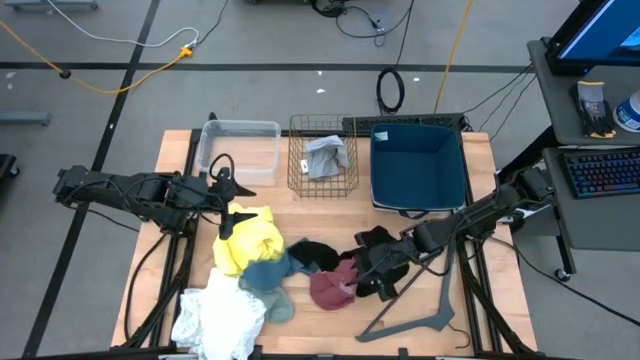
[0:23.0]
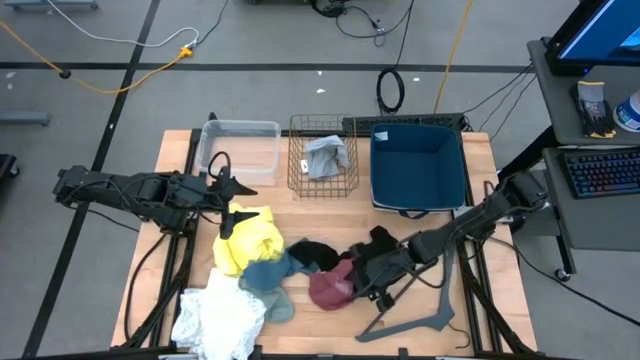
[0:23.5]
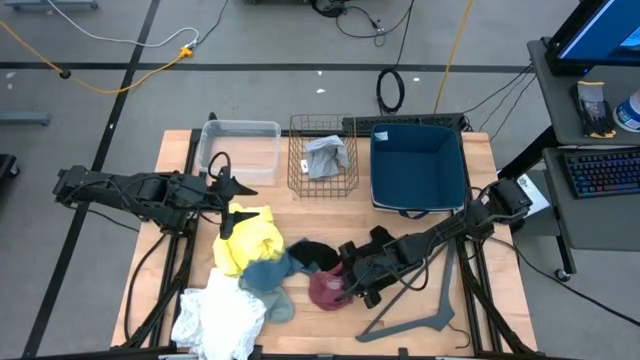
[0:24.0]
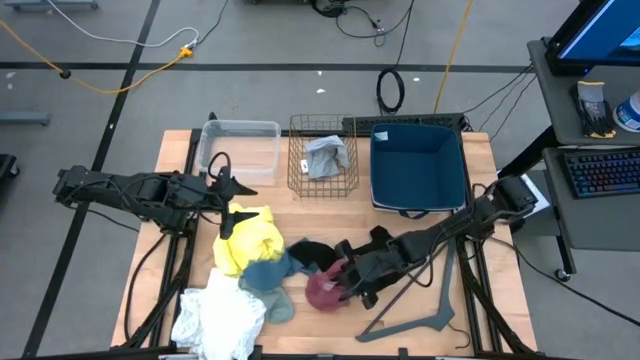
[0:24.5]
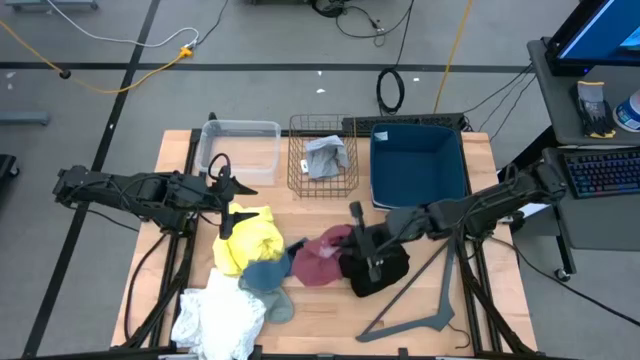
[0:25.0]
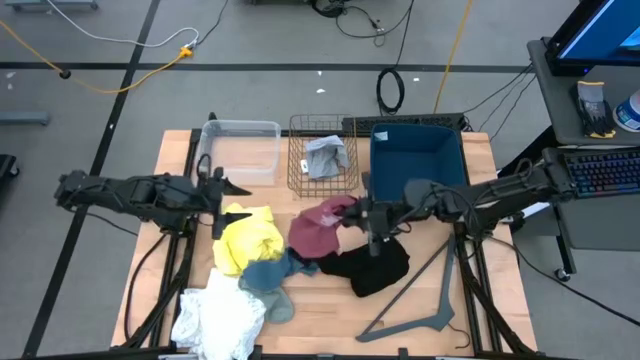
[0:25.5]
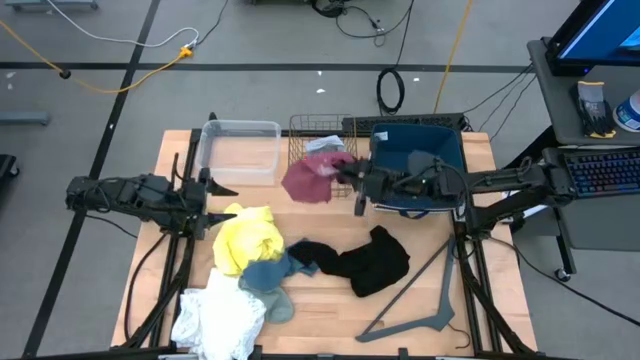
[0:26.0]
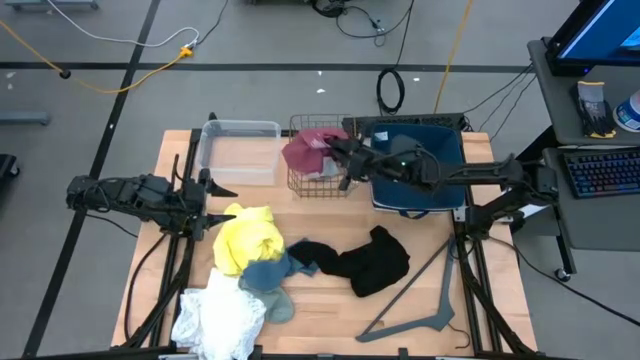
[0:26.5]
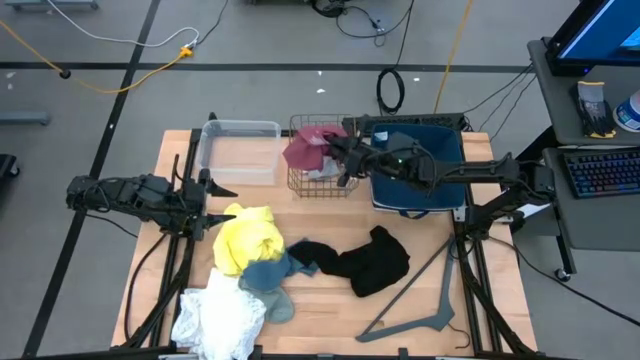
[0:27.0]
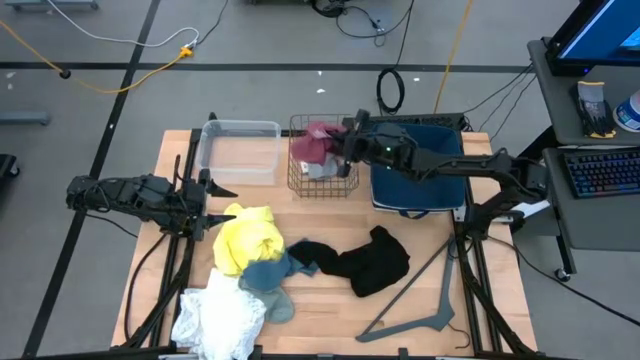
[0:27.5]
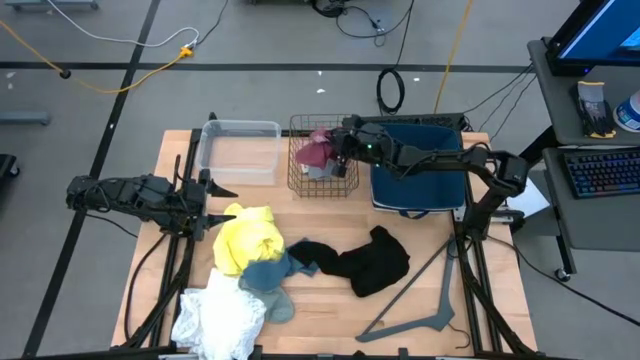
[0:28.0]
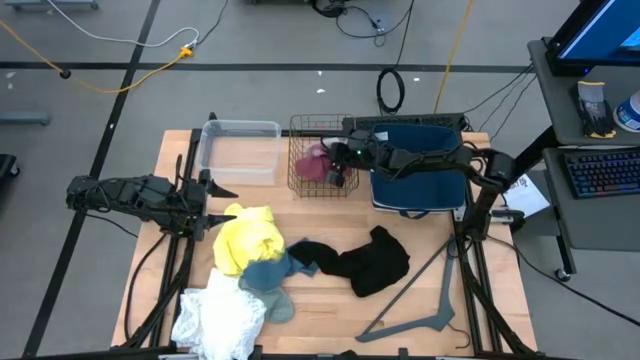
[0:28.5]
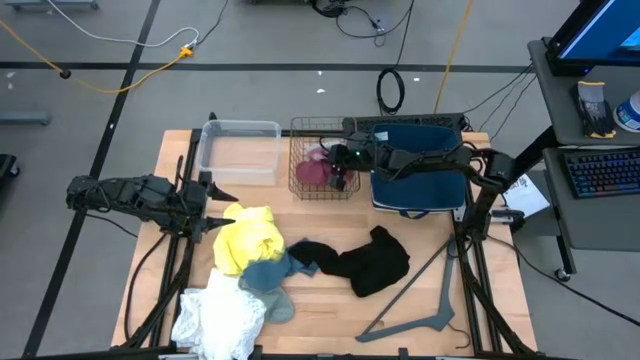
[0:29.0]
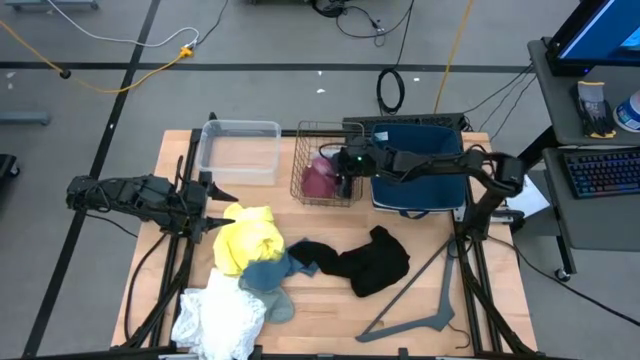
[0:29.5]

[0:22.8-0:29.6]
Task: Pick & Place Cloths
Put the red underwear into the wire basket

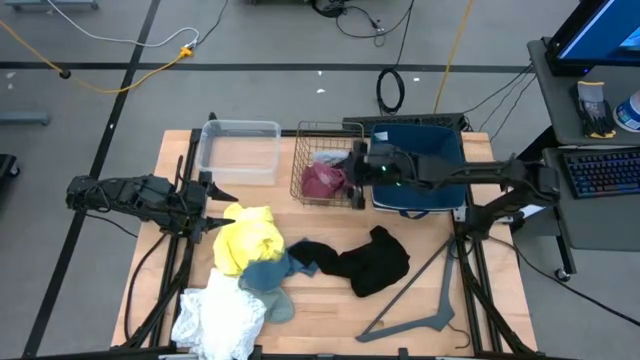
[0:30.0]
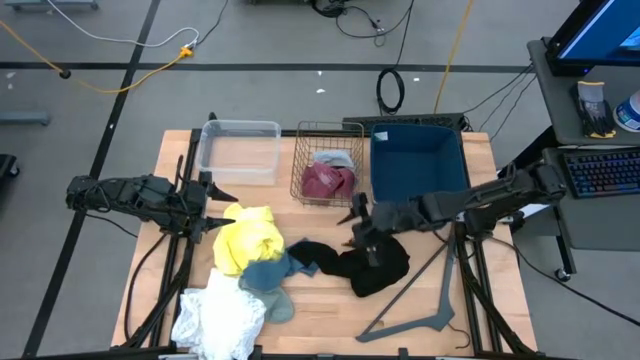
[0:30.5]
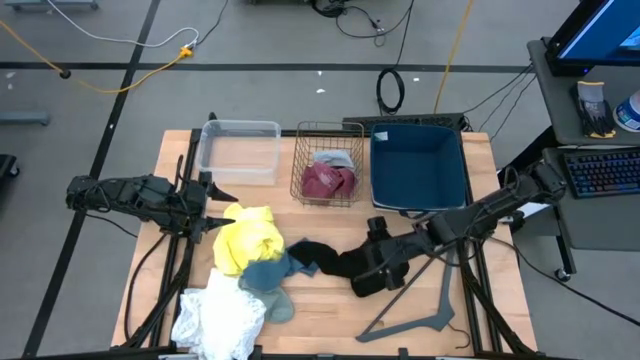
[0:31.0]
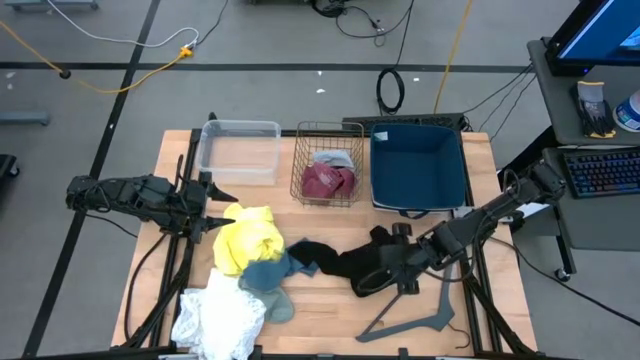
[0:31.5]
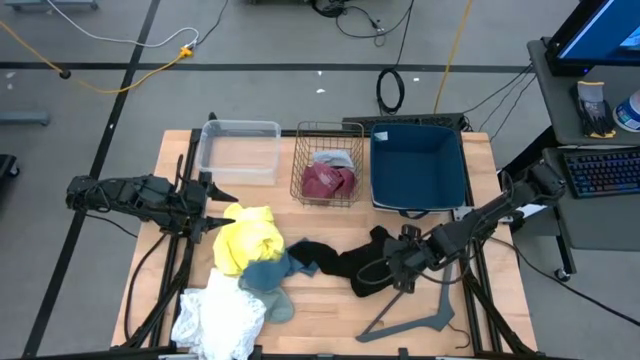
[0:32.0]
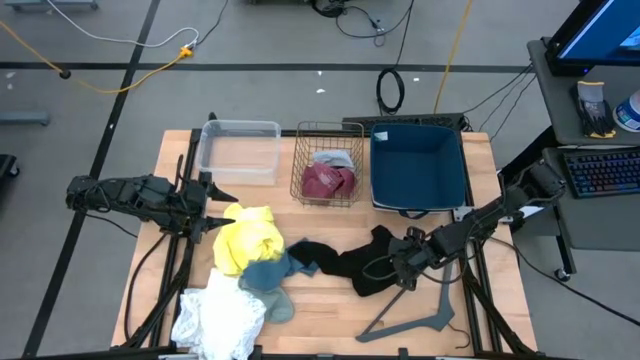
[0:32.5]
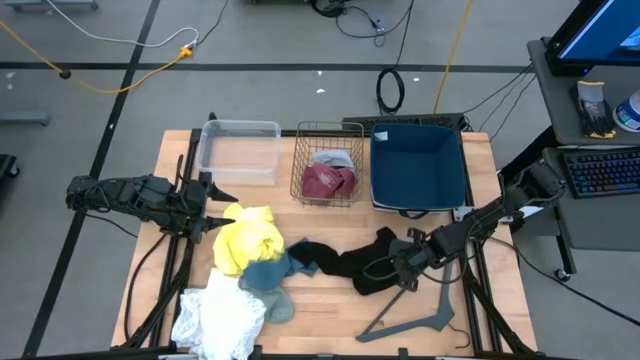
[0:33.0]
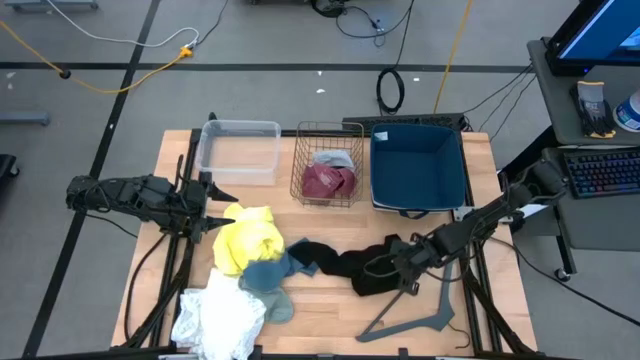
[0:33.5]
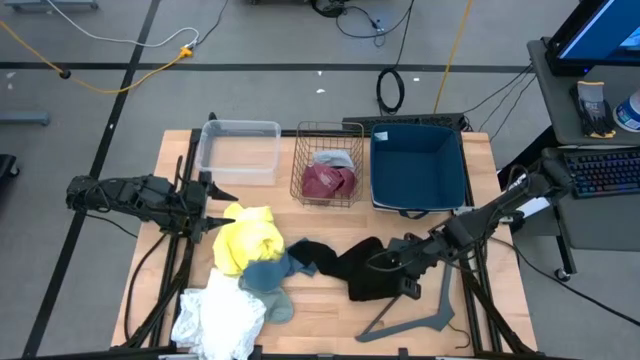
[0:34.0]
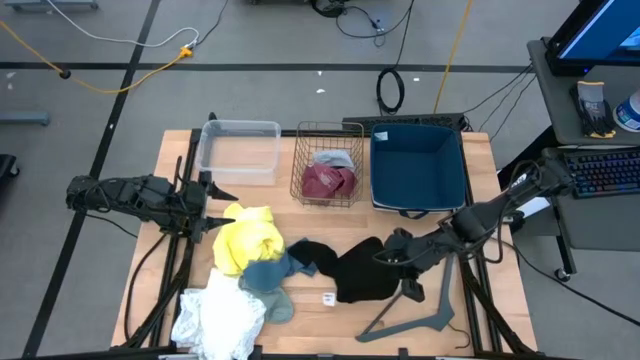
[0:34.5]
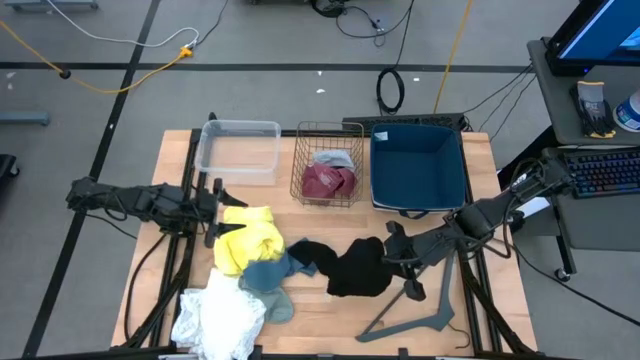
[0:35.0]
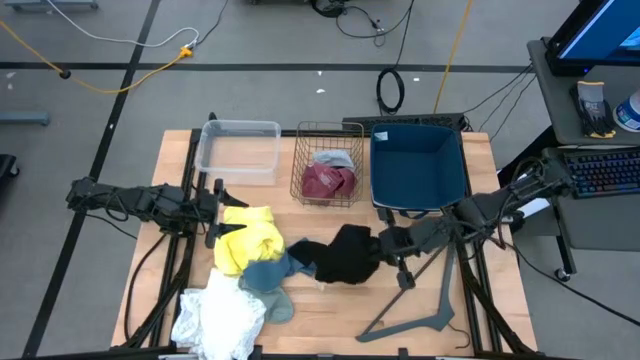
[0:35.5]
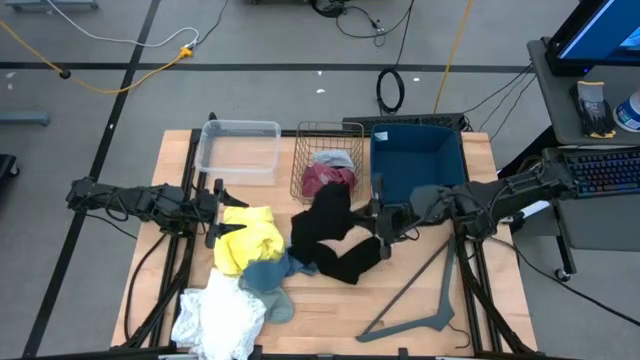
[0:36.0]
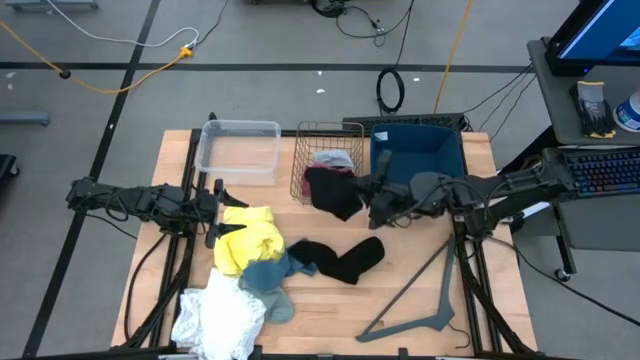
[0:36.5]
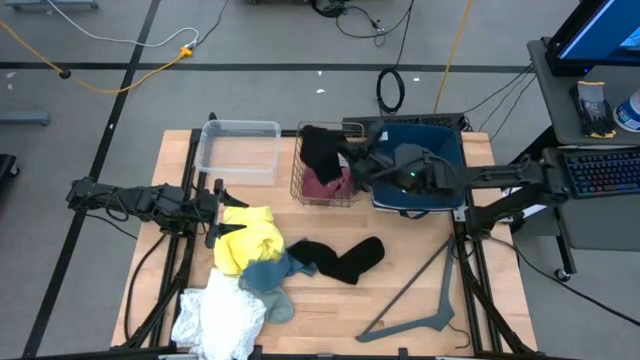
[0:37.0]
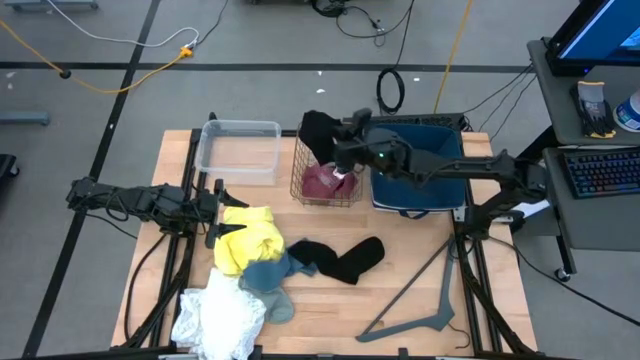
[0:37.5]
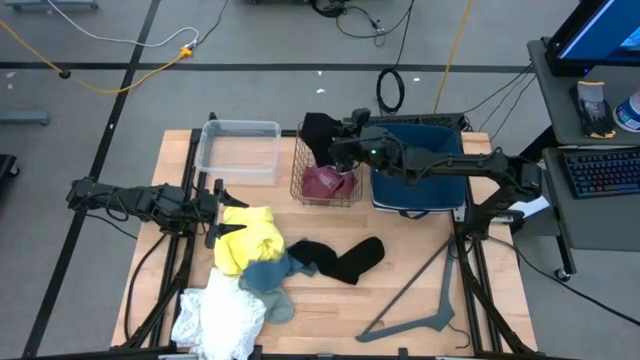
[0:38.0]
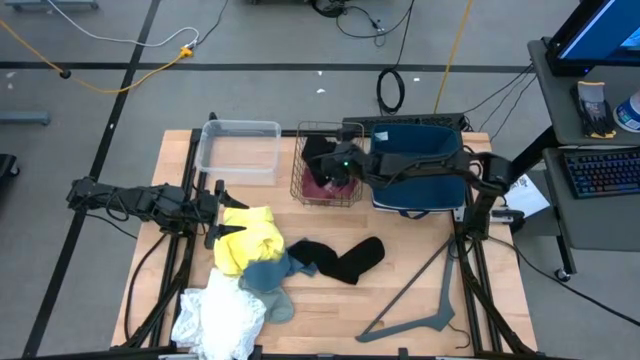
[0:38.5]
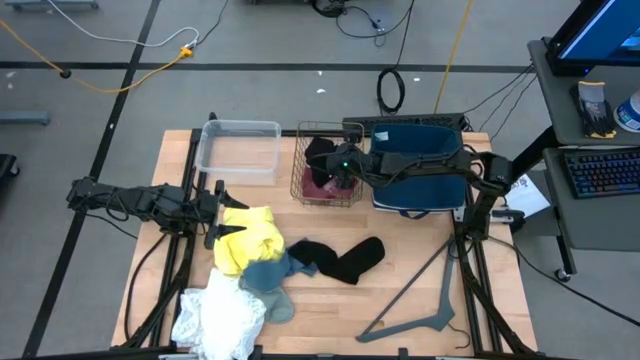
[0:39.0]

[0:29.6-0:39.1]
Put the black shorts into the wire basket

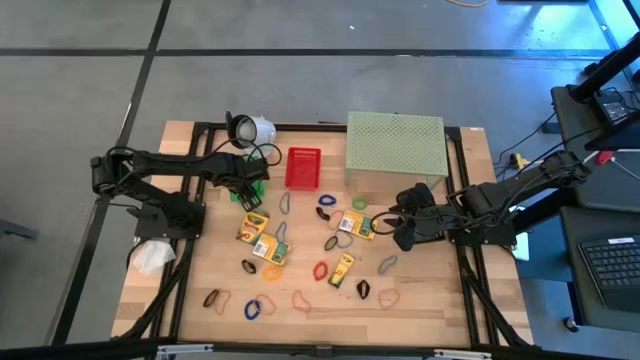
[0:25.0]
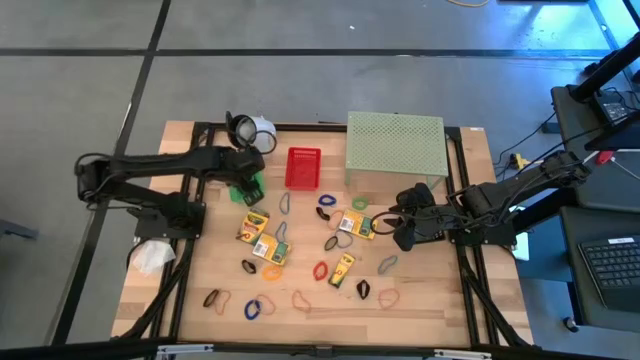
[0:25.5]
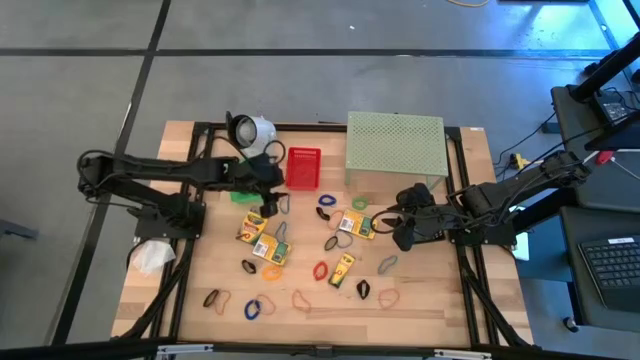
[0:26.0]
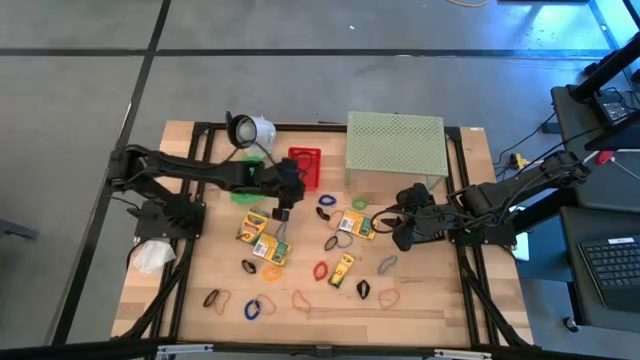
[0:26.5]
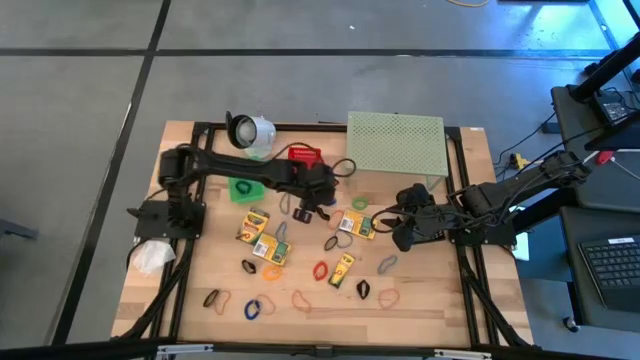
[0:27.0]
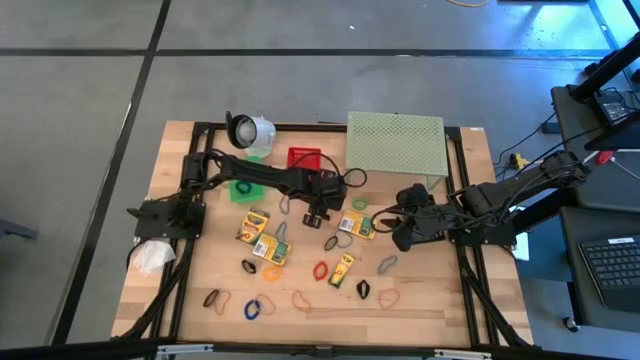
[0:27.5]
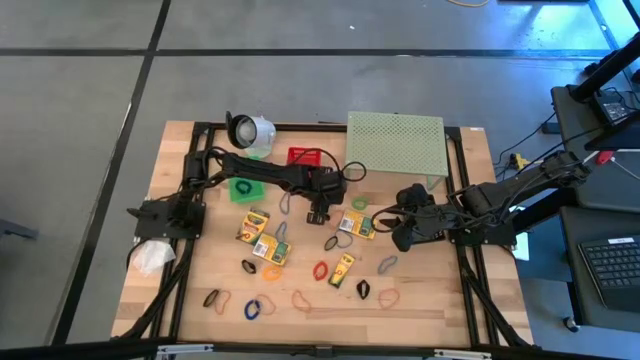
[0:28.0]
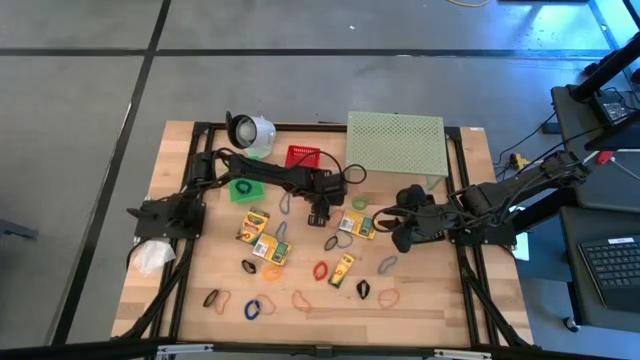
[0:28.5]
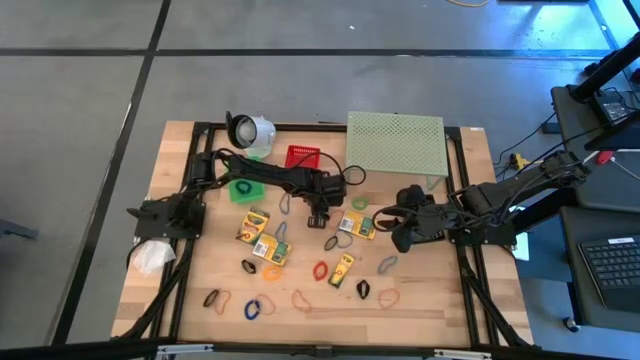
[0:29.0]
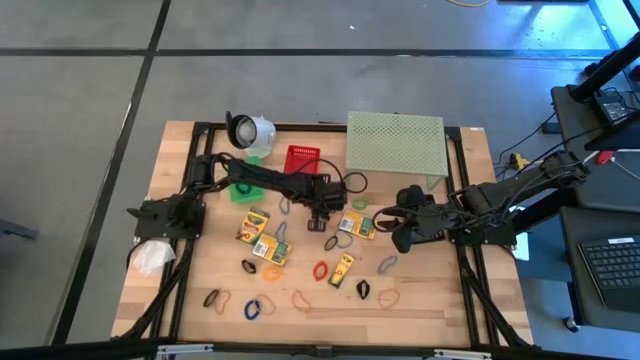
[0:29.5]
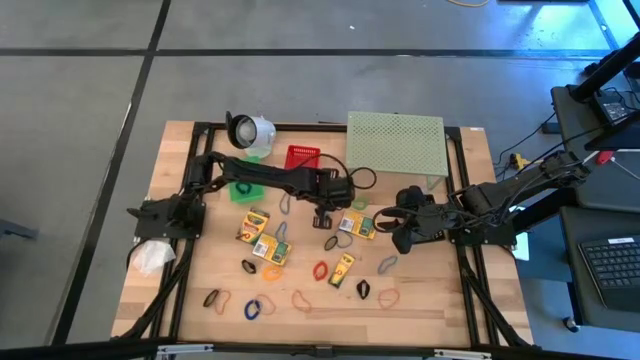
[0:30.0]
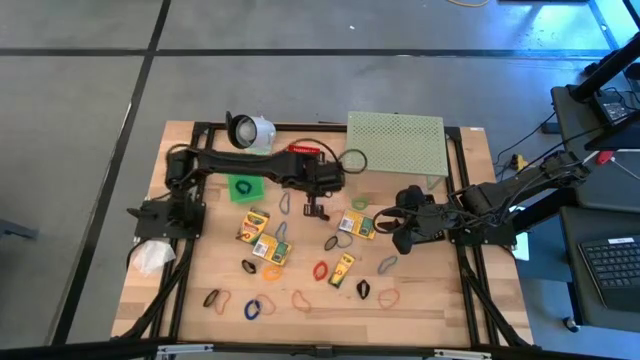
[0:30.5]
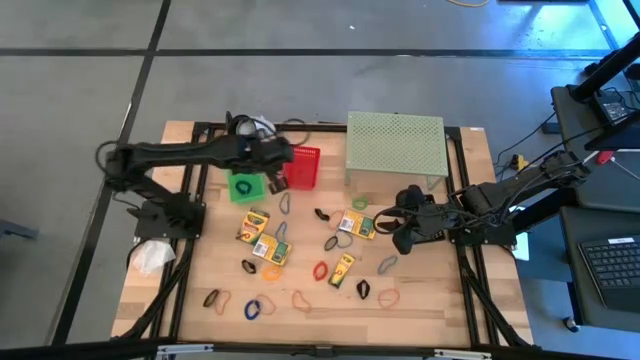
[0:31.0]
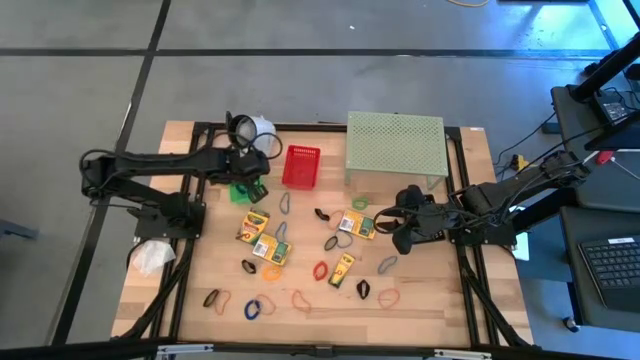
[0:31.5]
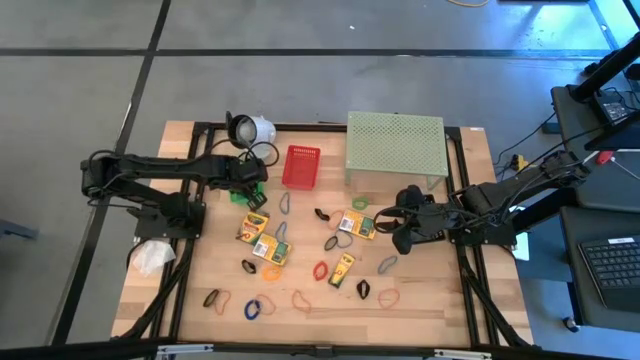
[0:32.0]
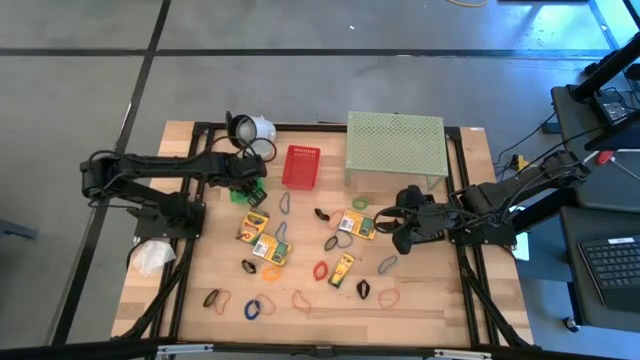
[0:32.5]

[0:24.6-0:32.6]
Task: Pick & Place Office Desk Supplies
Put the blue spring keychain into the green basket
